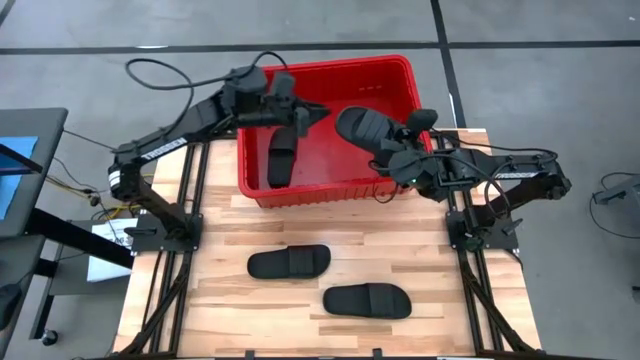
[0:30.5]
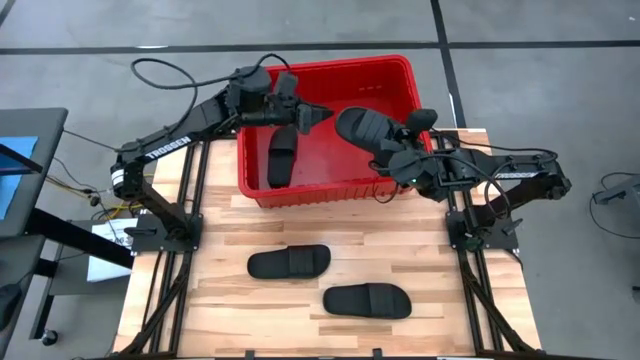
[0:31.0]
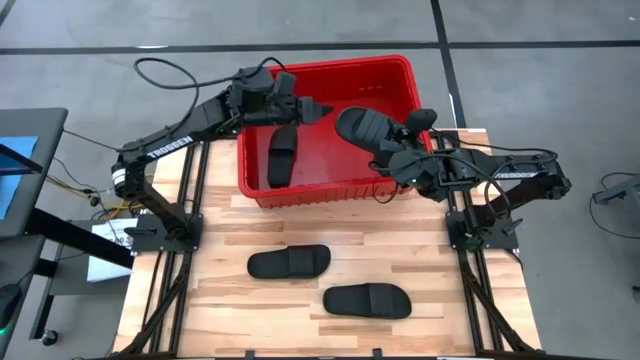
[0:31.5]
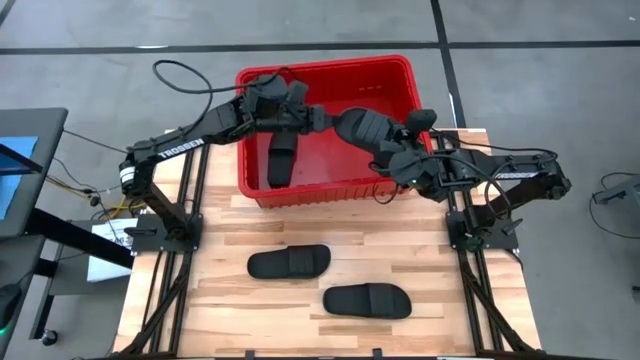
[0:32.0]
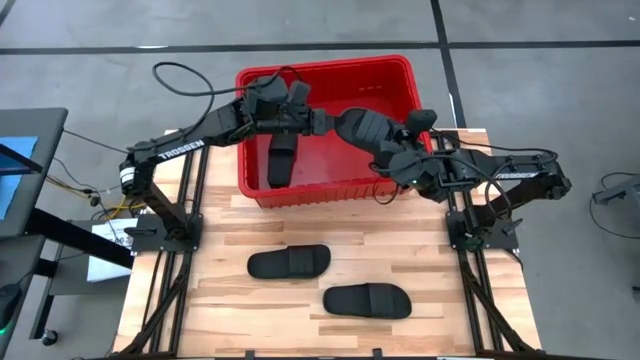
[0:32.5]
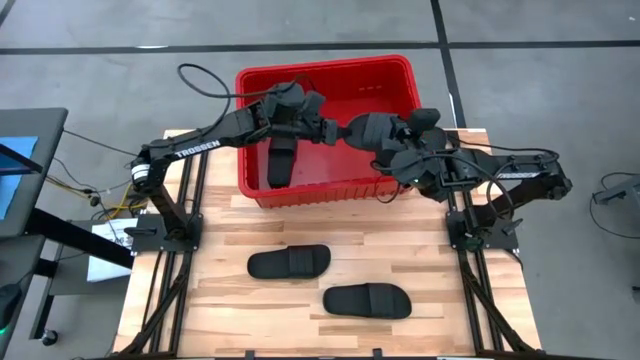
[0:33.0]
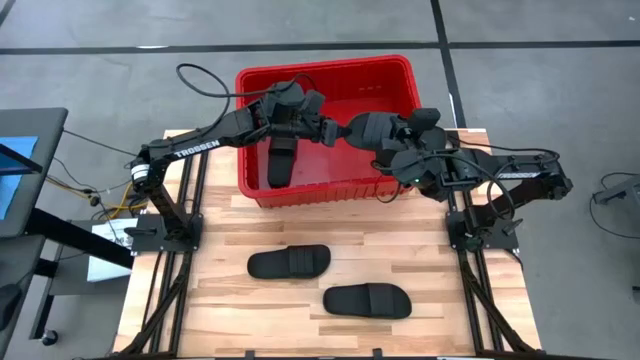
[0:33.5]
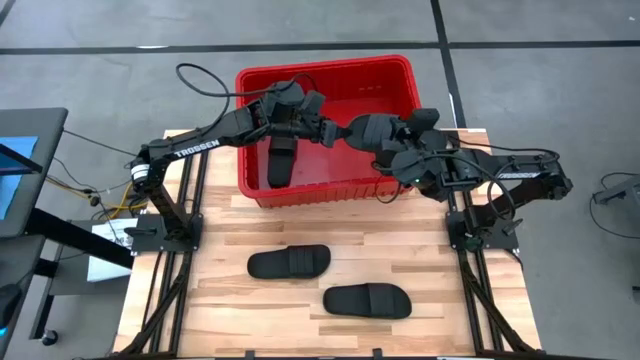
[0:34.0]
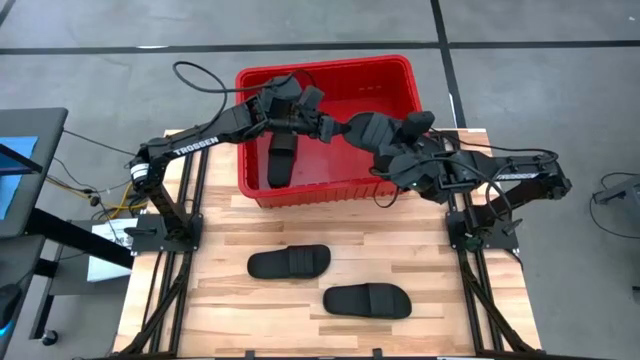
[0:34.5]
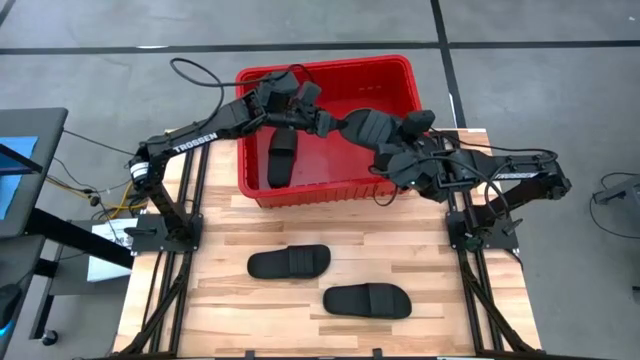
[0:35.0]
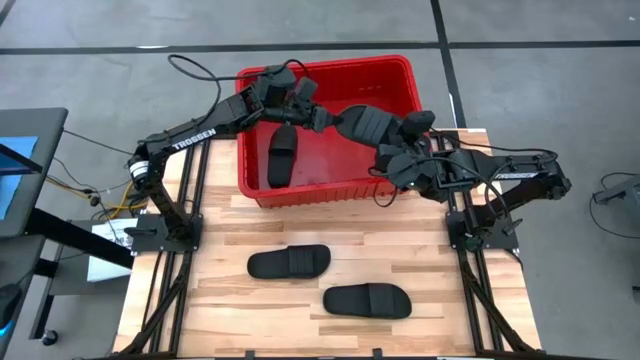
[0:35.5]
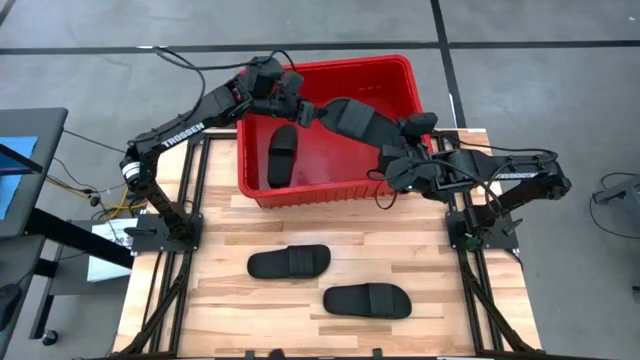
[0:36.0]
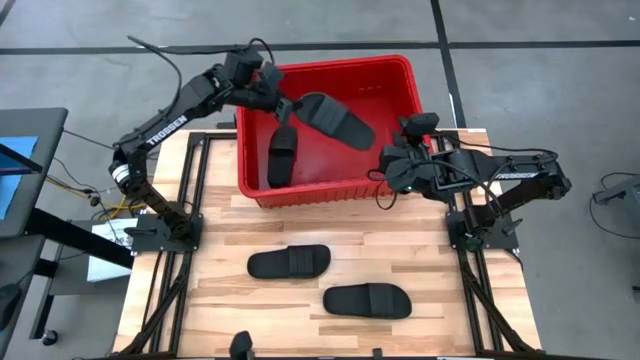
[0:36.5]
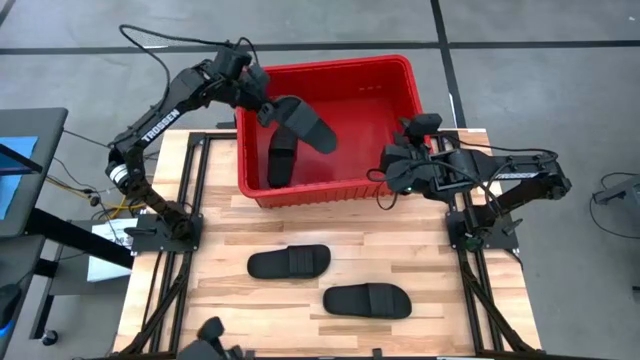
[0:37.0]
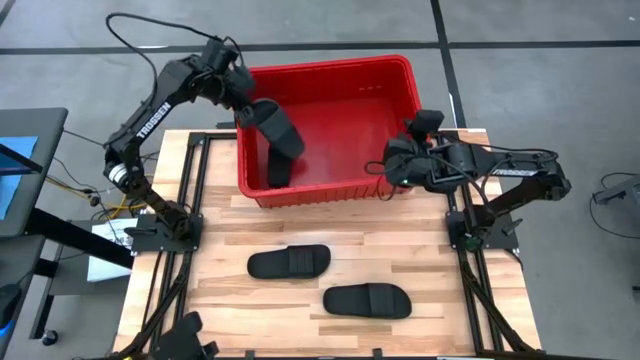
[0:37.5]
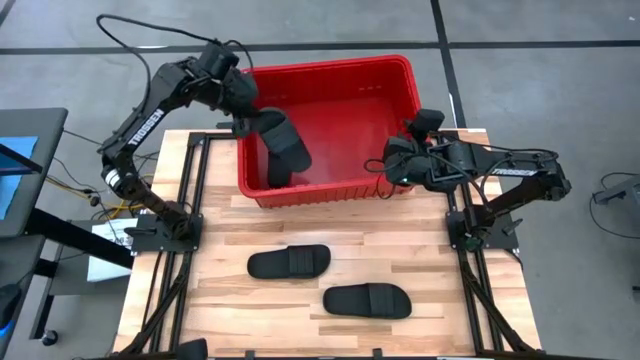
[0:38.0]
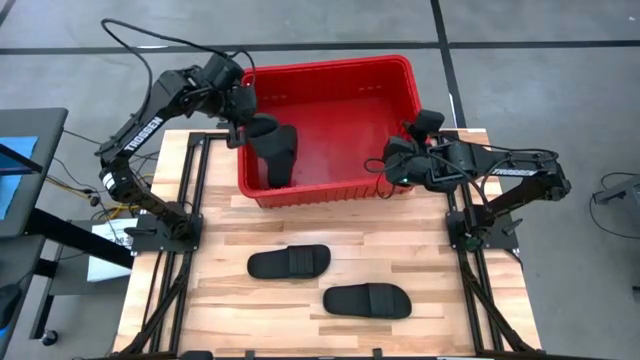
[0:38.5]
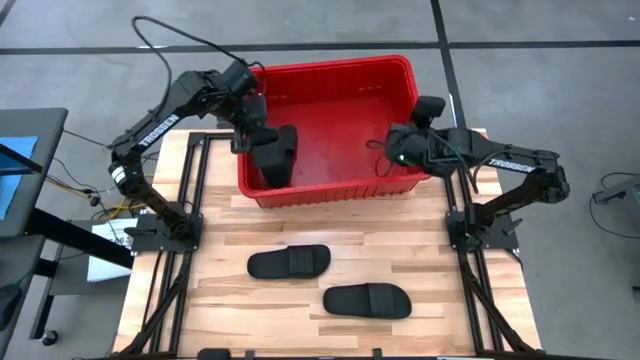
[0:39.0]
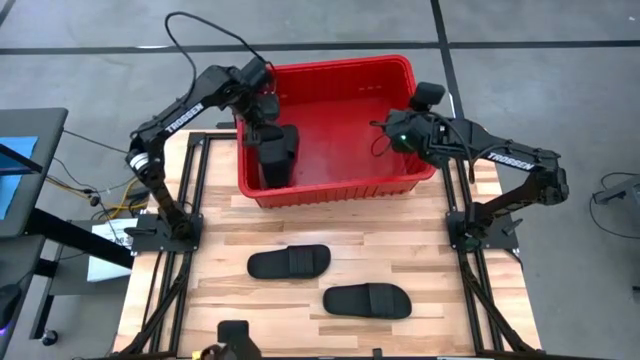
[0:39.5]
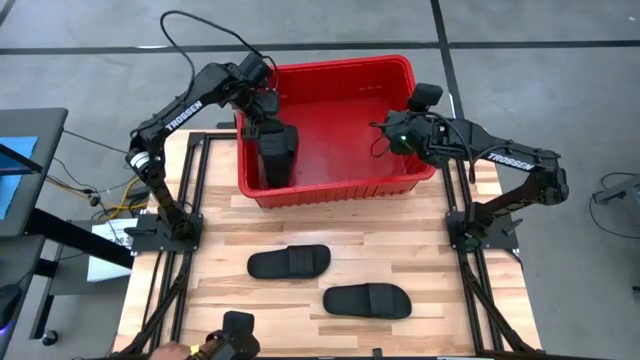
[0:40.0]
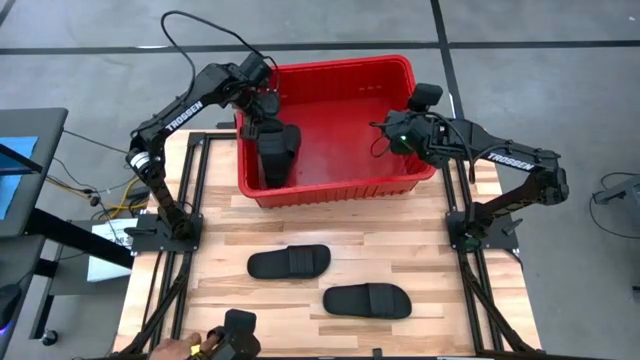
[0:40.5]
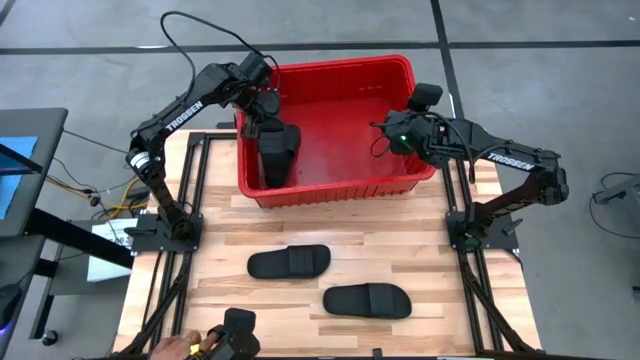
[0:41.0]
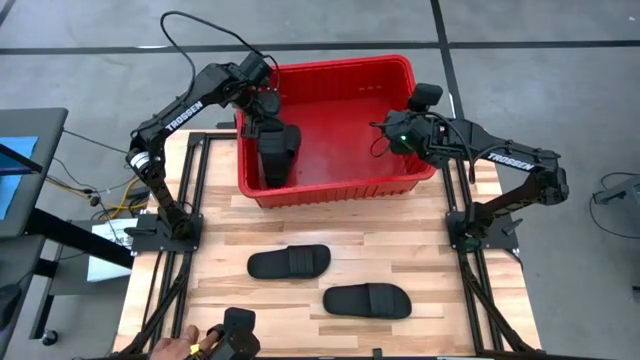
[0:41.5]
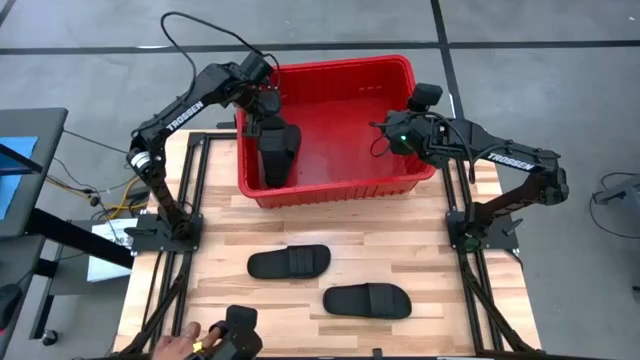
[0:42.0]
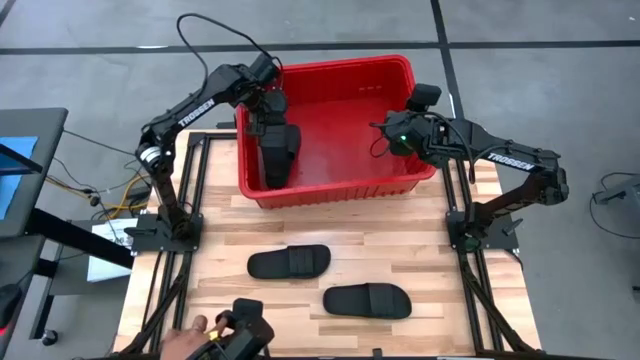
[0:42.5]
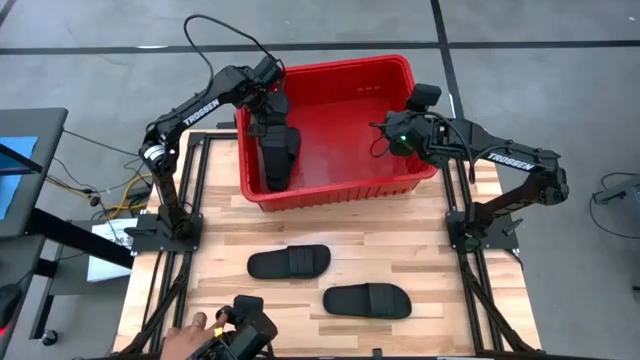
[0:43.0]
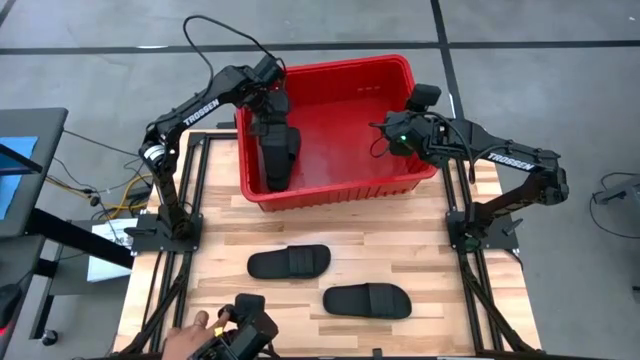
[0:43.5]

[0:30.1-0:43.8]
Task: Pick and place slides into bin
Put the top right black slide into the red bin

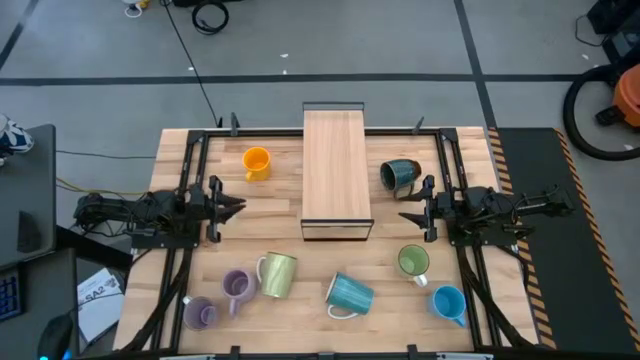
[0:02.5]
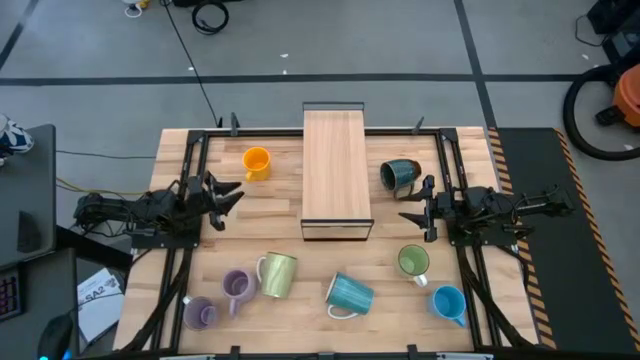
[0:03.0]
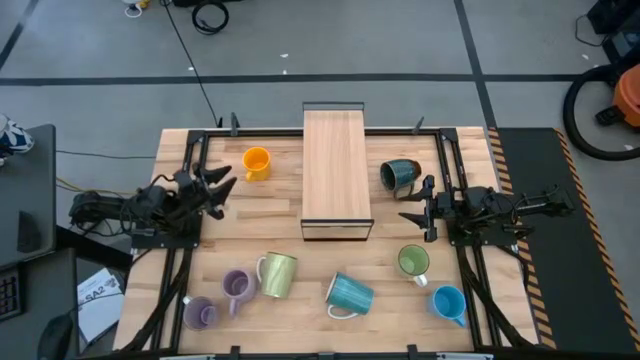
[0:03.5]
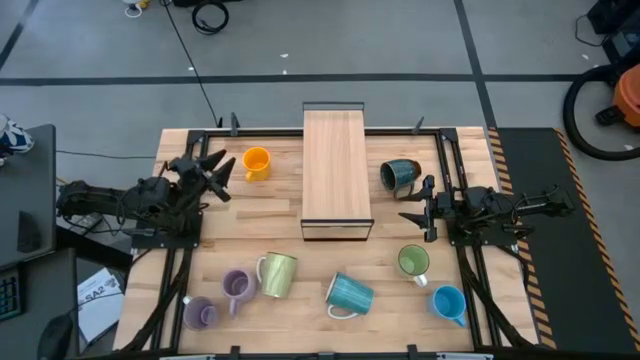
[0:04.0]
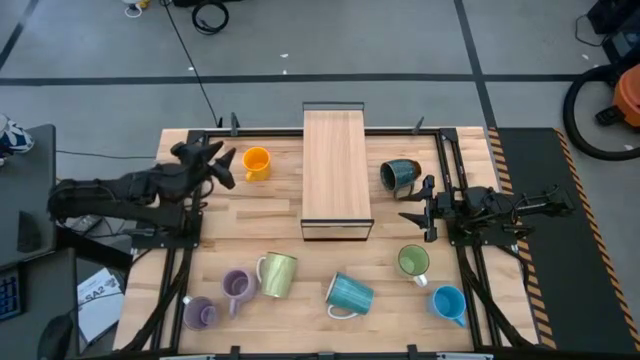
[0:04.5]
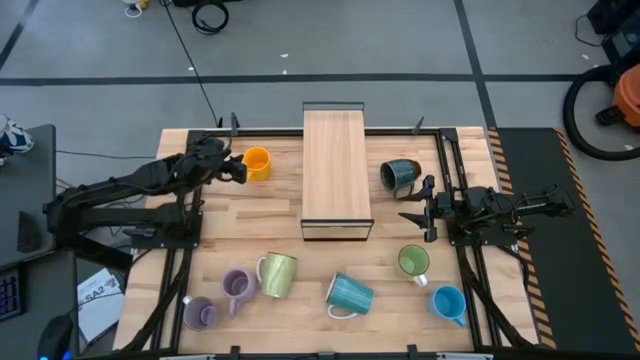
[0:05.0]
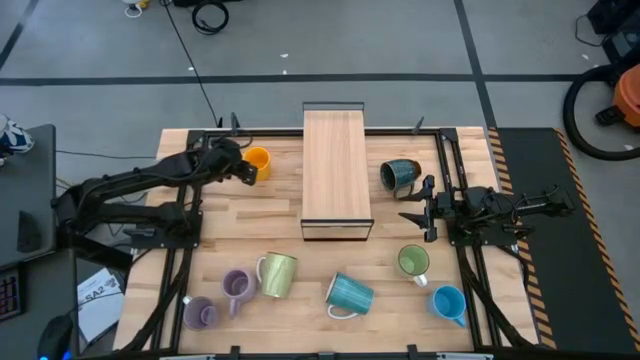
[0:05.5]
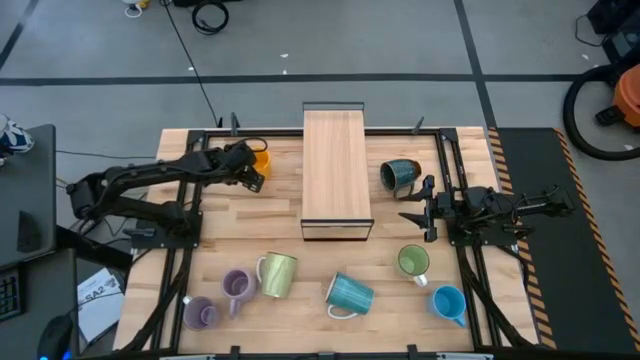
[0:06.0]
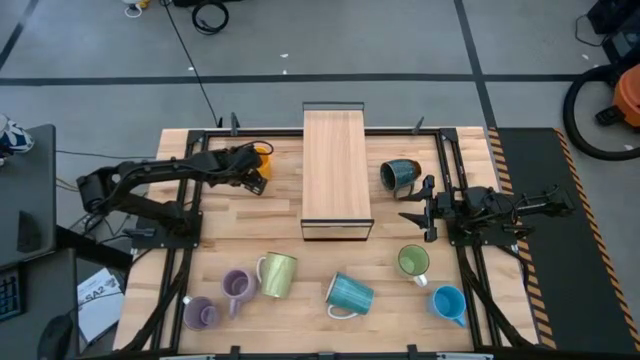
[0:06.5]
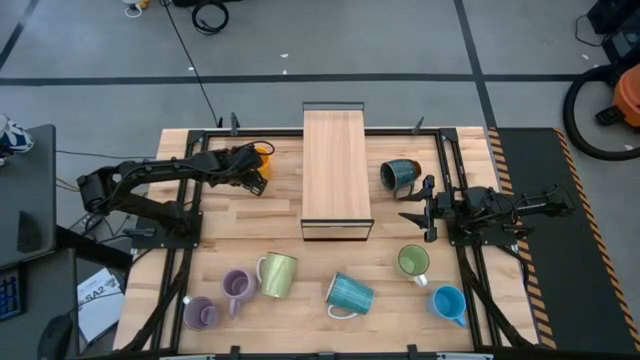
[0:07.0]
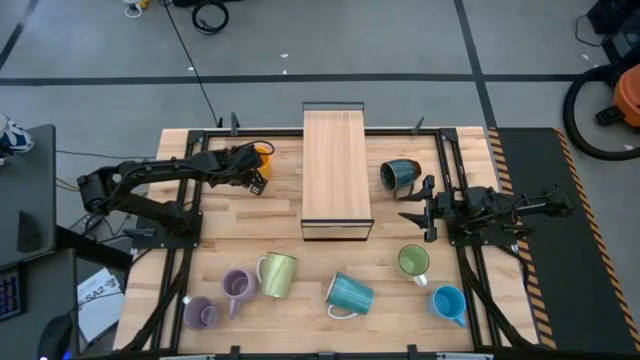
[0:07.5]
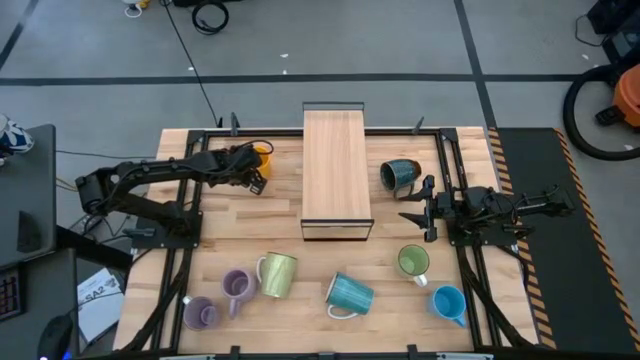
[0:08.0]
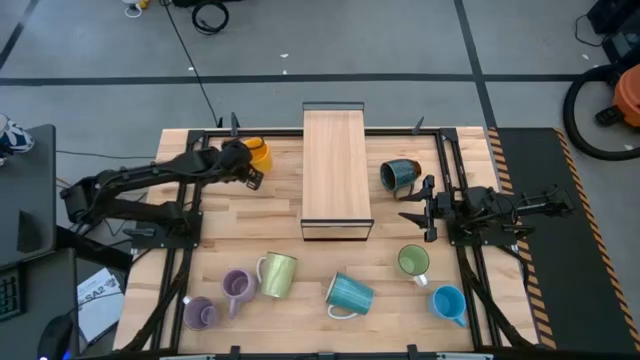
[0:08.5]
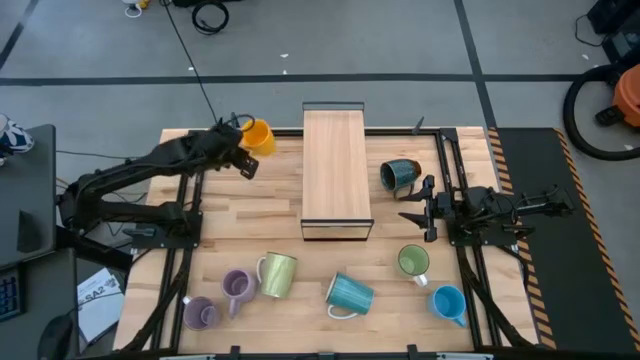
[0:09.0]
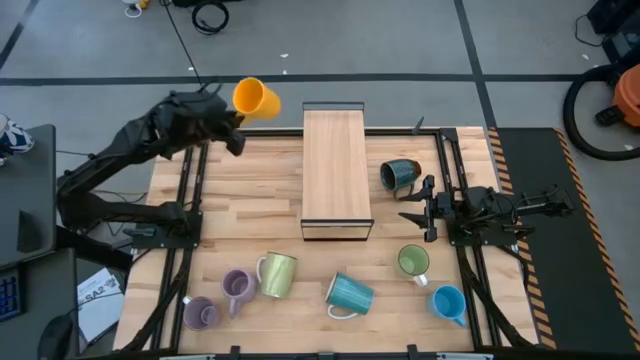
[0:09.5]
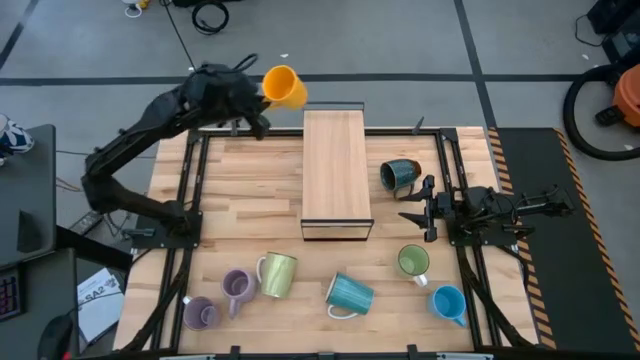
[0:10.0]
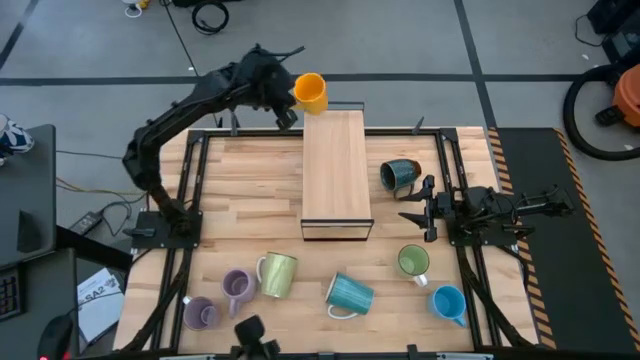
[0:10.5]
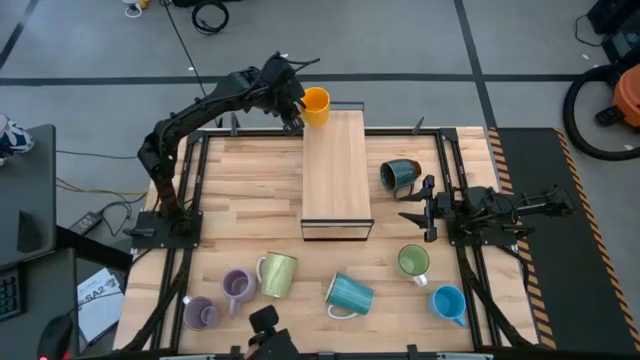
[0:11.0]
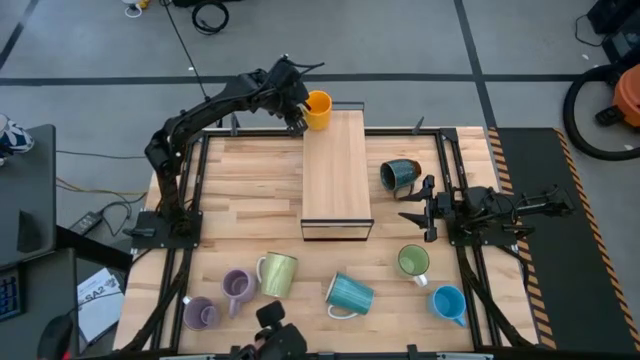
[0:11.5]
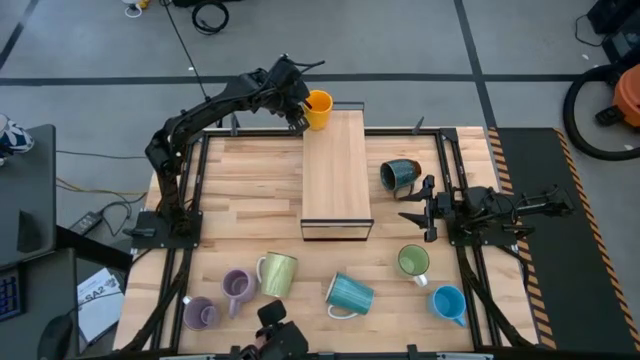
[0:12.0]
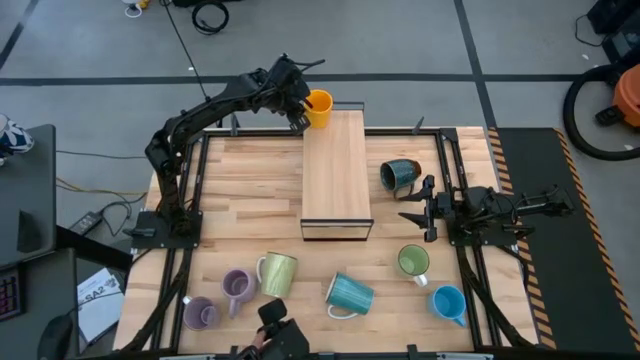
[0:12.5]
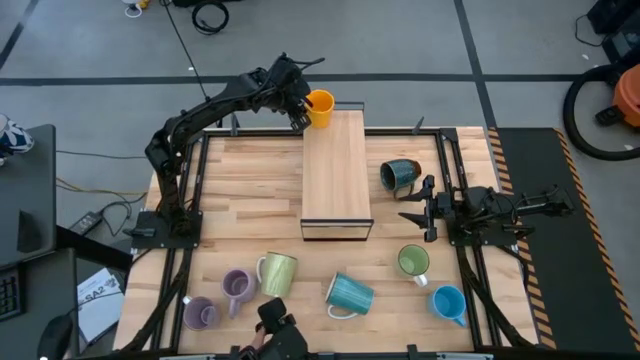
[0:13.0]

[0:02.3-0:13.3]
Task: Place coffee mugs
Put the yellow mug on the shelf
